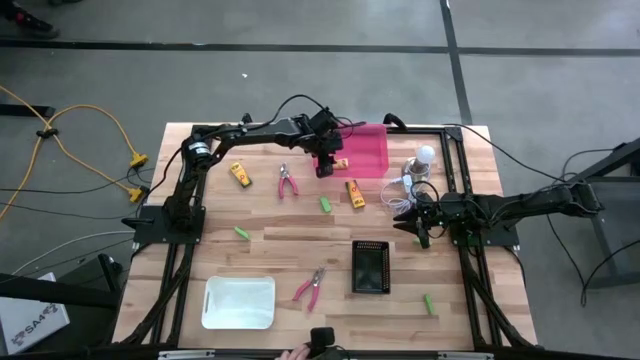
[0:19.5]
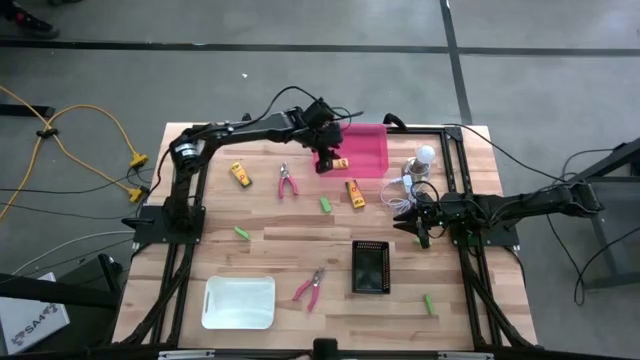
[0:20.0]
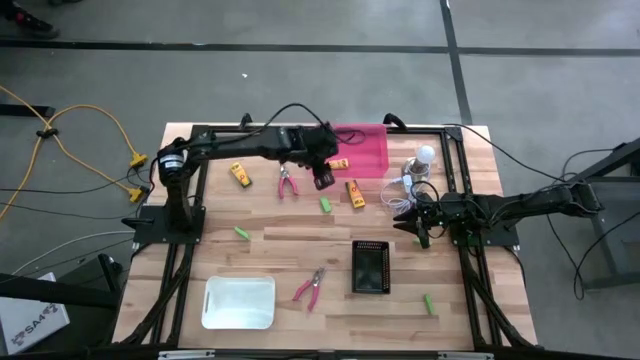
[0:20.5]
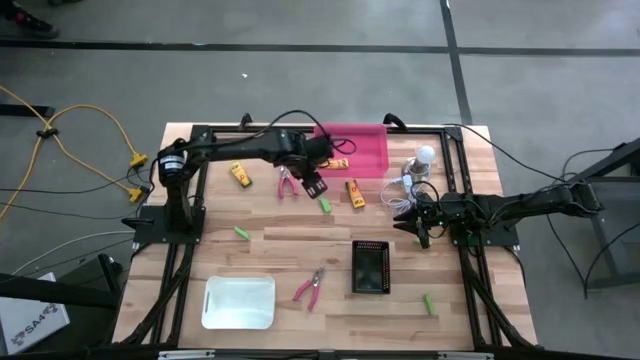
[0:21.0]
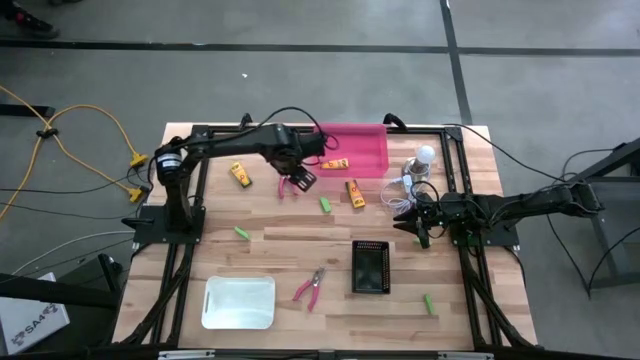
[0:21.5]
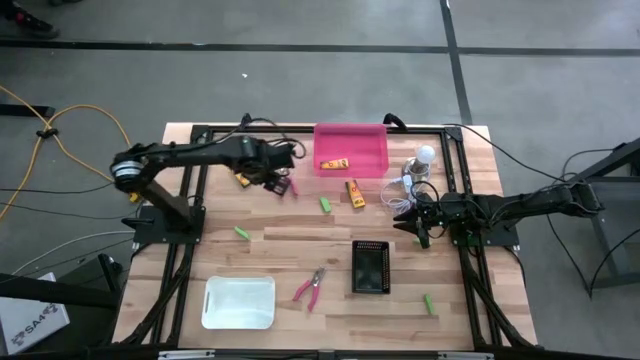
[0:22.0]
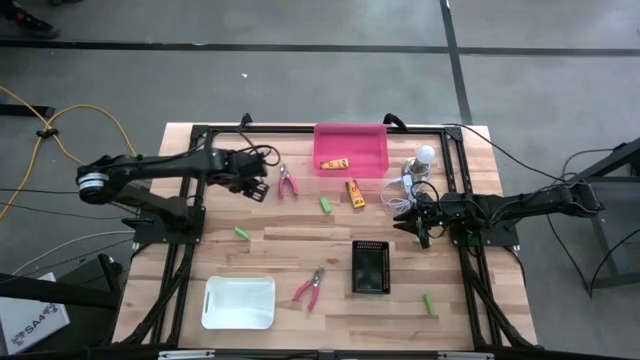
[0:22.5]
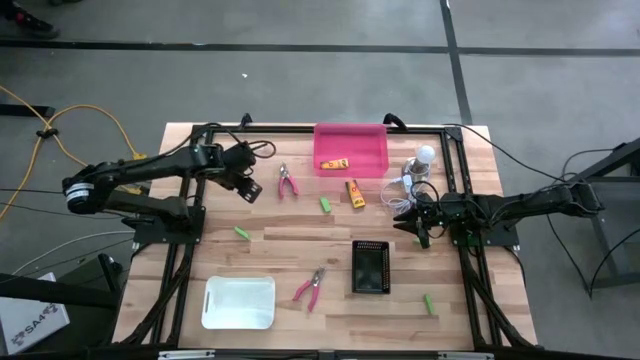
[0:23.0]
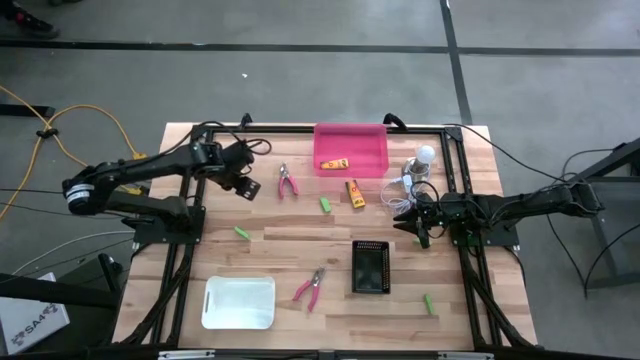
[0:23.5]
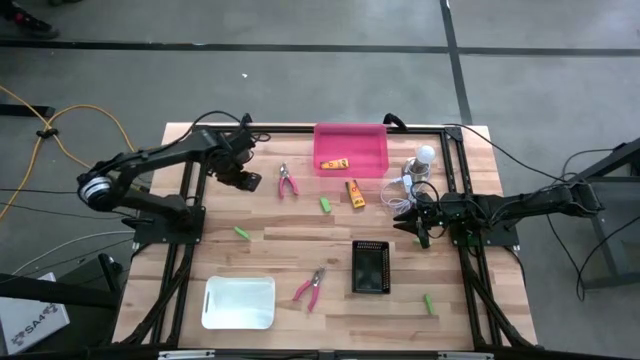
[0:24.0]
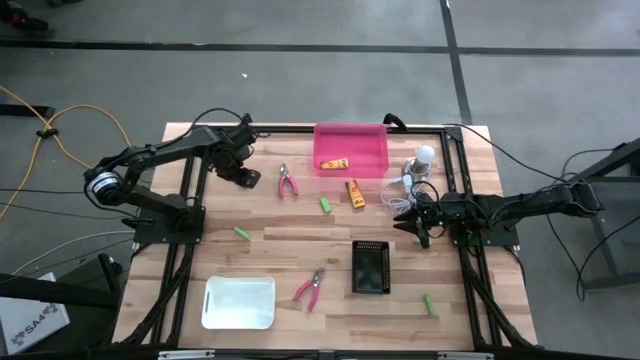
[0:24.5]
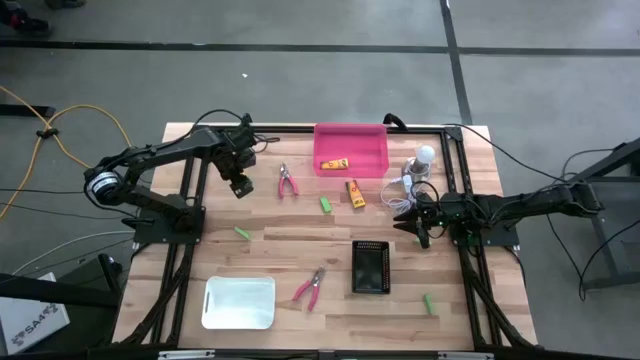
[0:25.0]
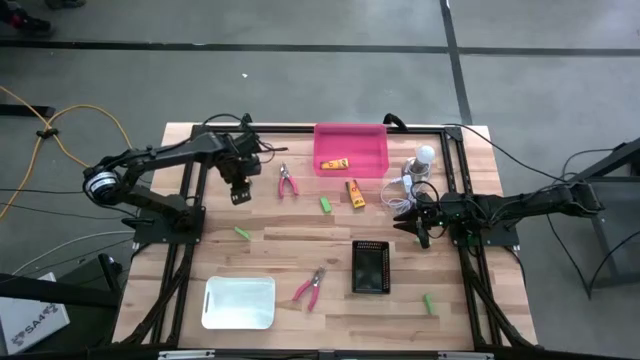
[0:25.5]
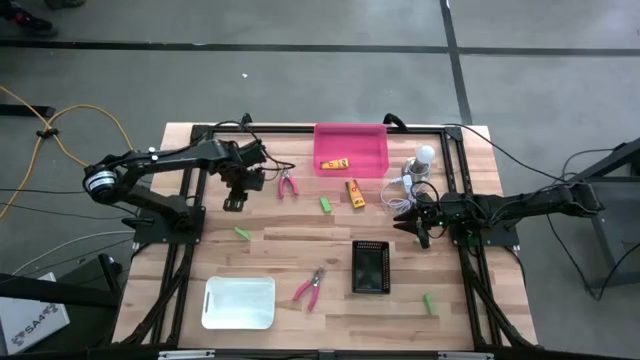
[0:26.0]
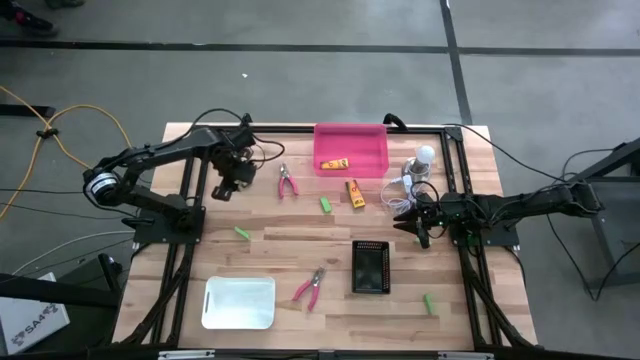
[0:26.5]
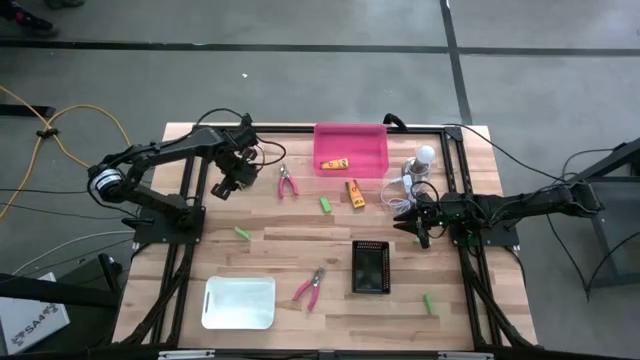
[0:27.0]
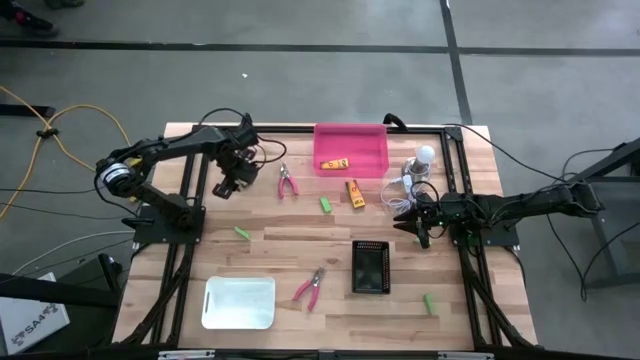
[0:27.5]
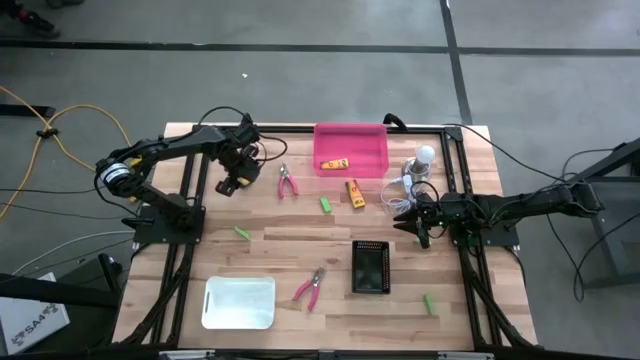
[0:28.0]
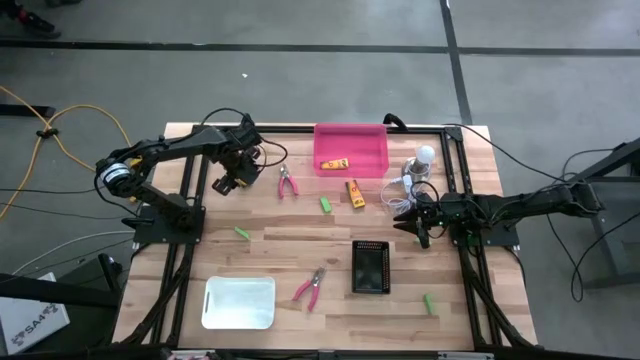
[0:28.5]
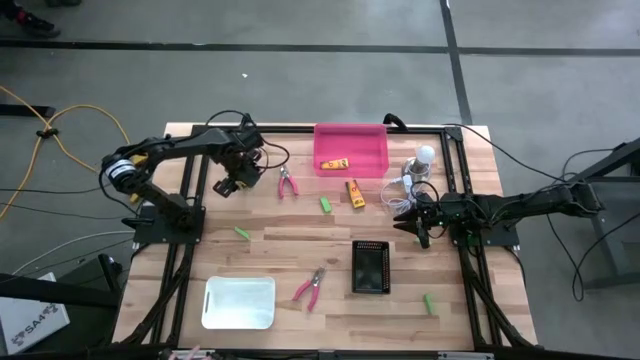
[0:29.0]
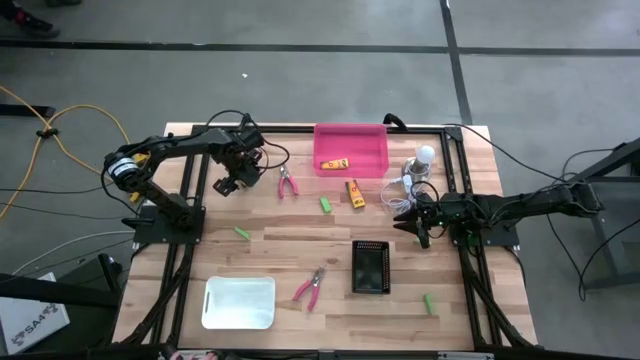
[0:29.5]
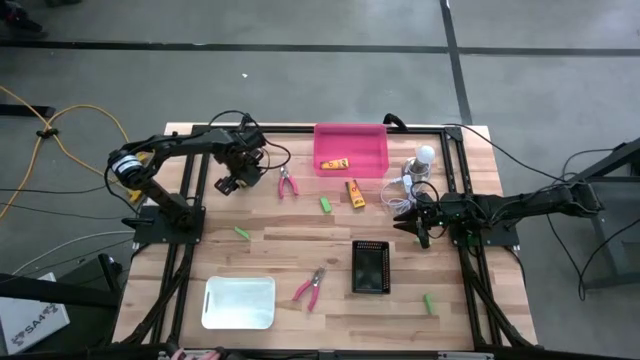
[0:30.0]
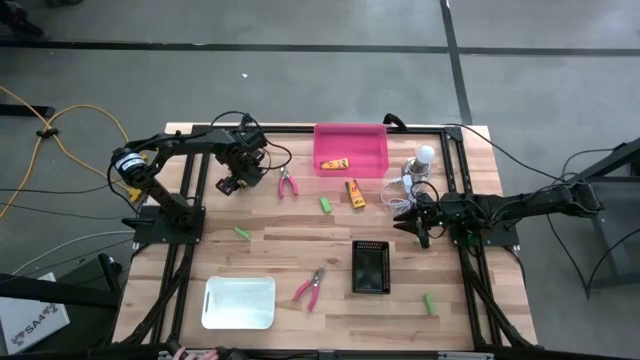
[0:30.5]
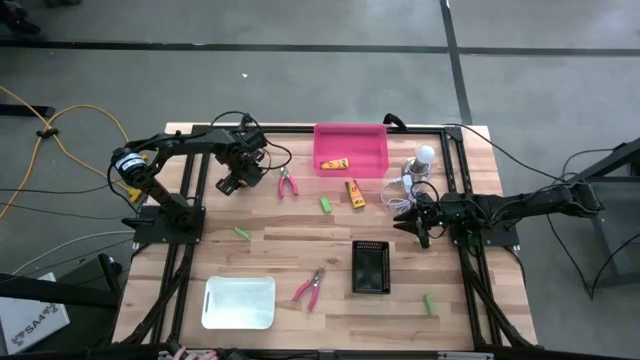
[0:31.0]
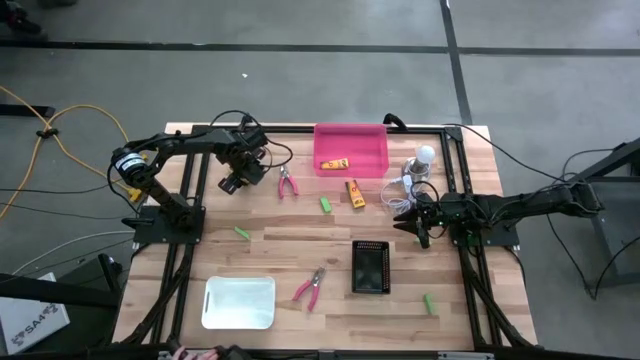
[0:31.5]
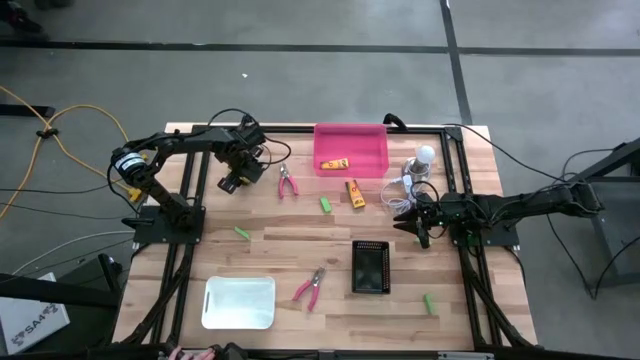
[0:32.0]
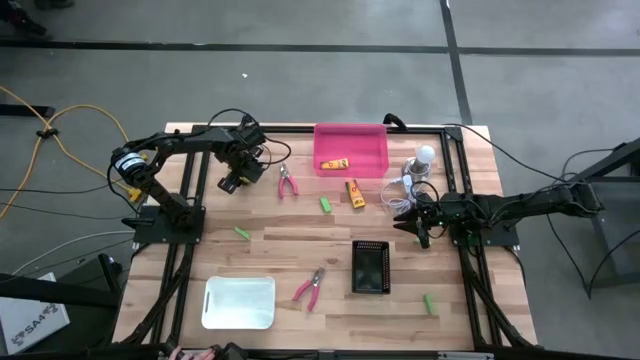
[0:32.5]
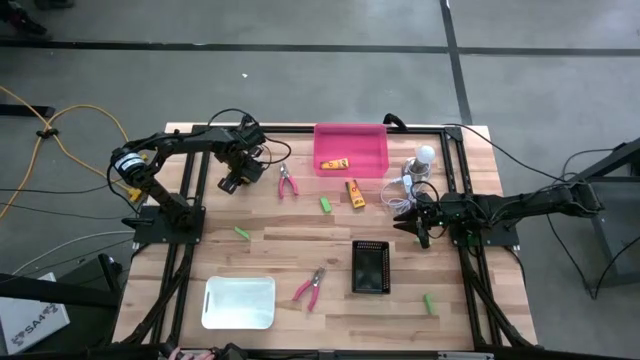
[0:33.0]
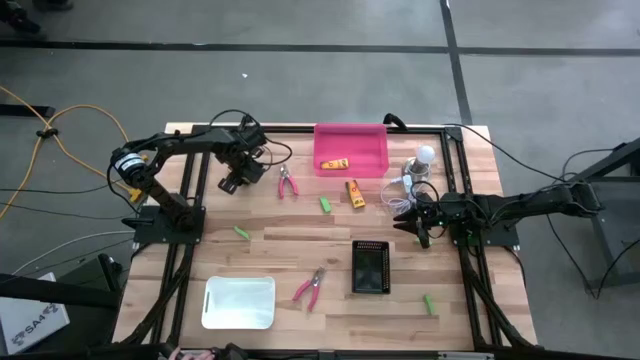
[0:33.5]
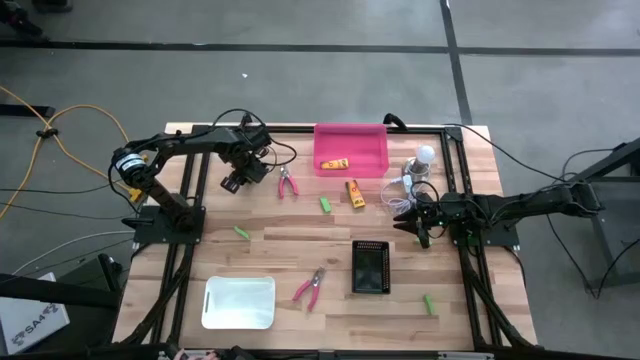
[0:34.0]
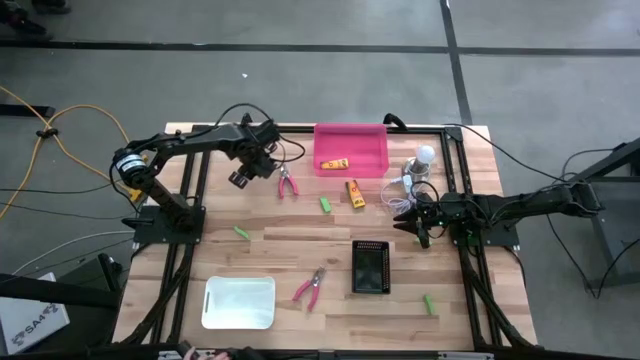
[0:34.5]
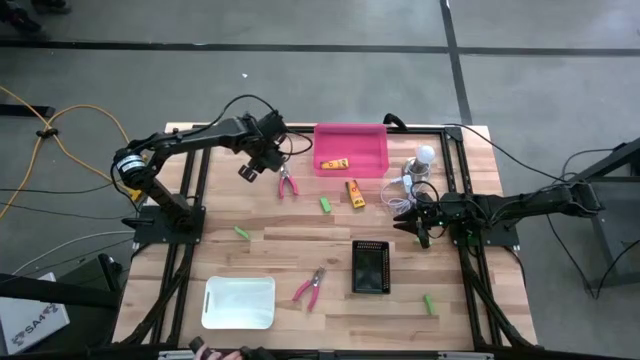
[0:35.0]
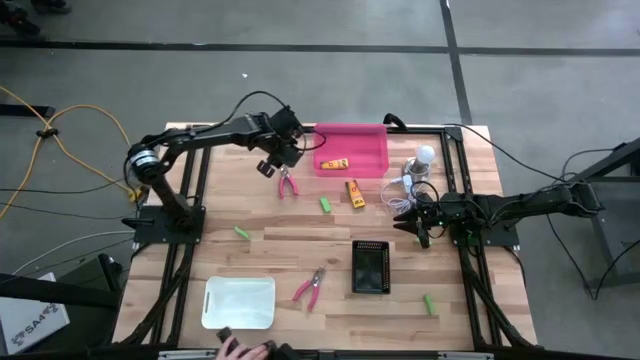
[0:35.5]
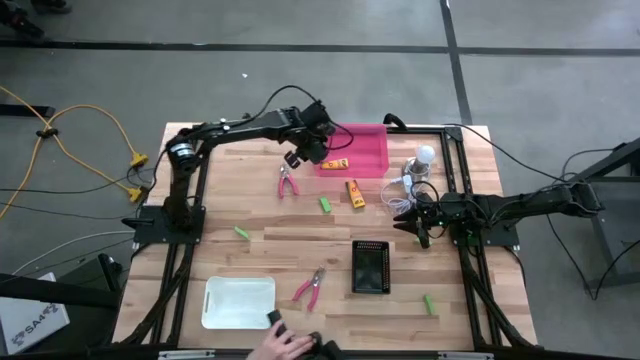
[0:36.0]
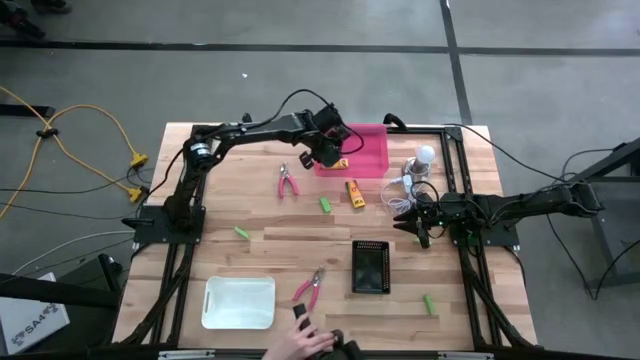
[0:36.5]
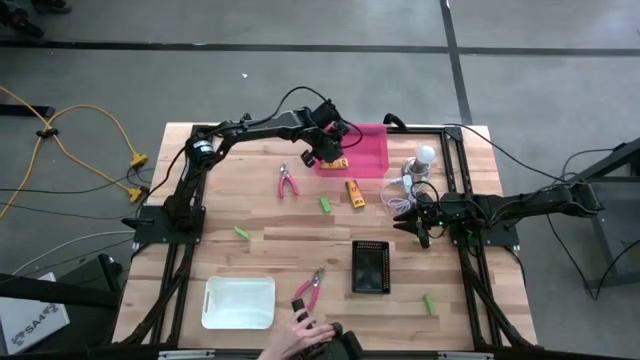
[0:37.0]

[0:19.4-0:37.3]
Task: Pick & Place School Supplies
Put the yellow crayon box into the pink bin

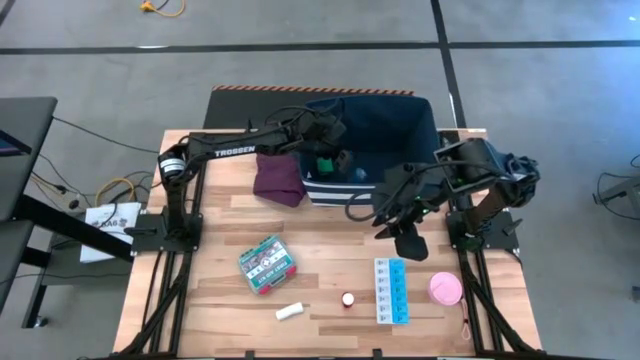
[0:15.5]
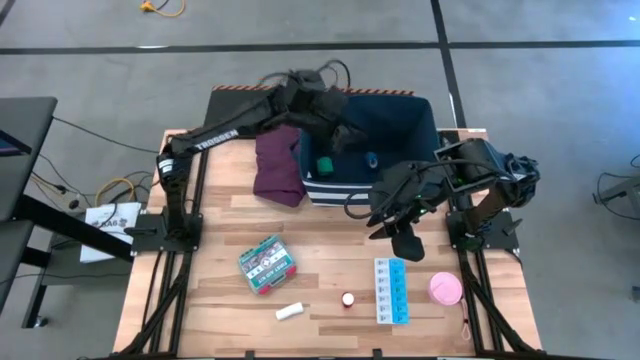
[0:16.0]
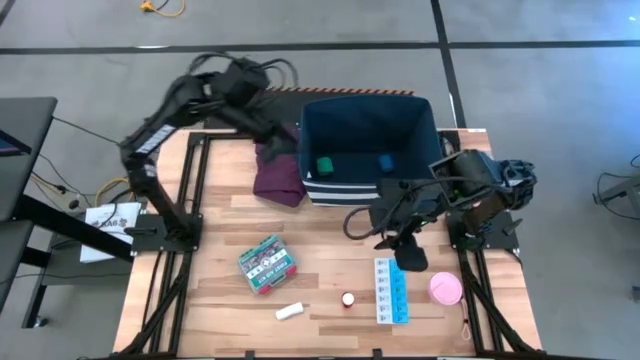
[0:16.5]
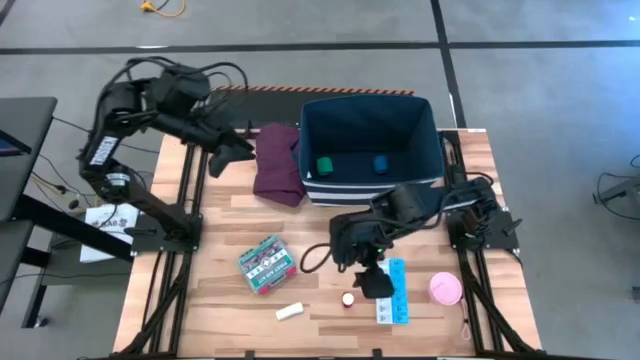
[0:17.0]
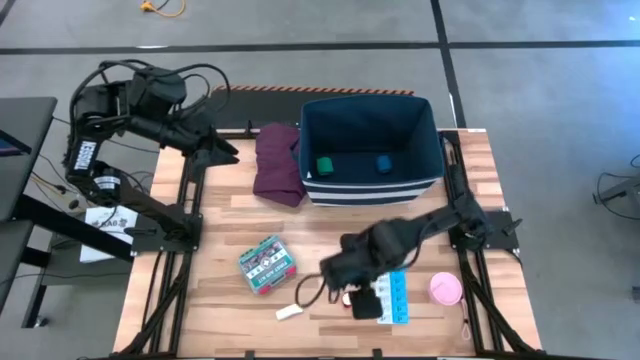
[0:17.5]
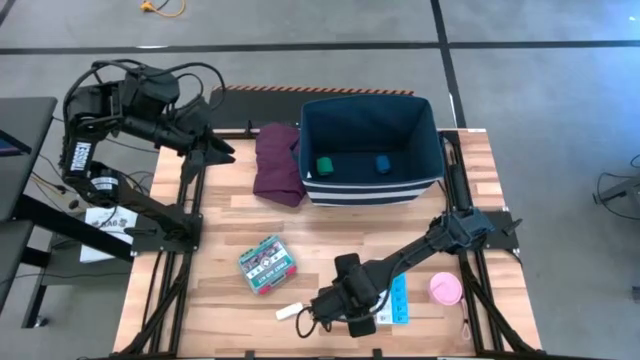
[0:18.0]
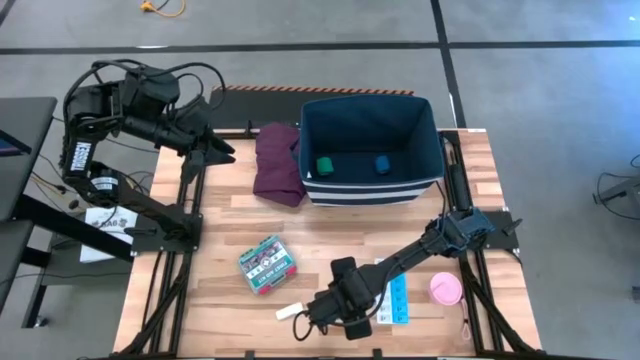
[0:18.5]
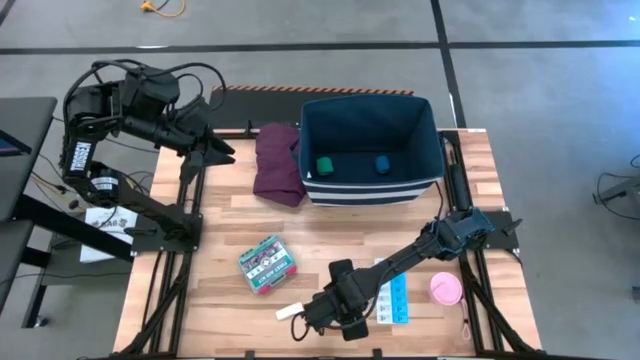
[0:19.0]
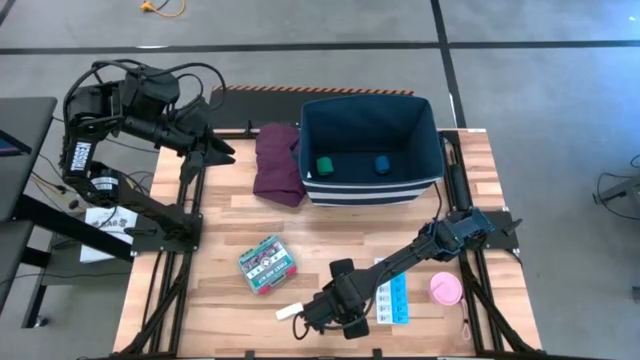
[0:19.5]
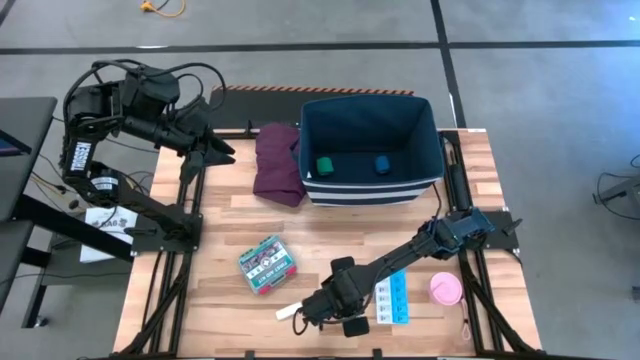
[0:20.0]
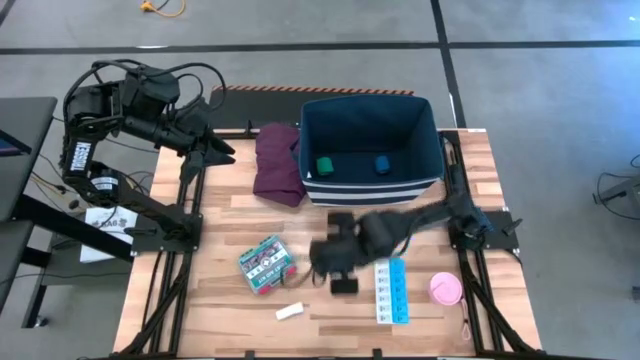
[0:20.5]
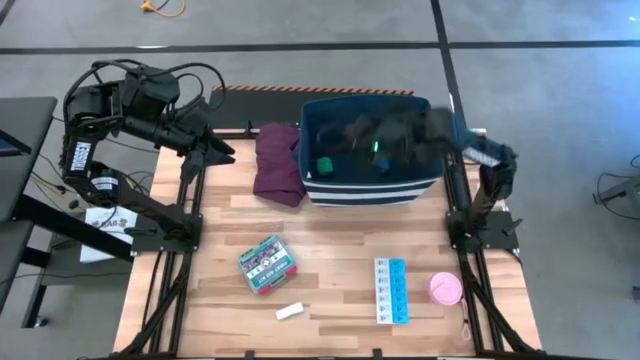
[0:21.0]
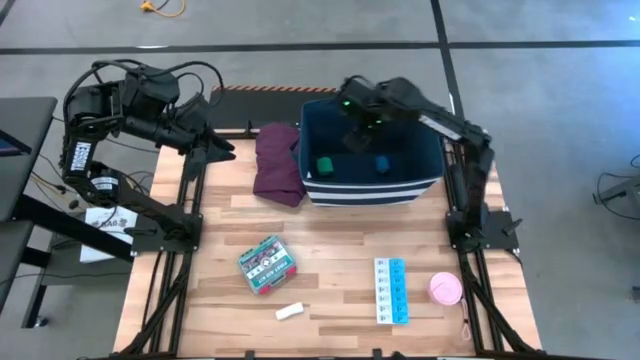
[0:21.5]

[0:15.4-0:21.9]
Task: Pick & place medical supplies in basket/bin
Put the red medicine bottle into the blue organizer
